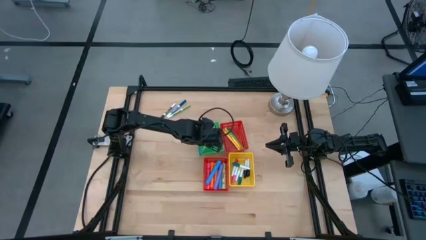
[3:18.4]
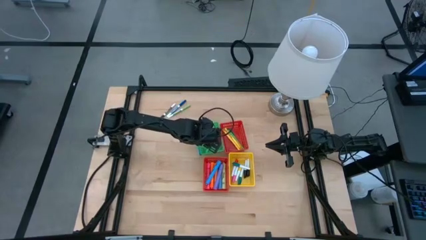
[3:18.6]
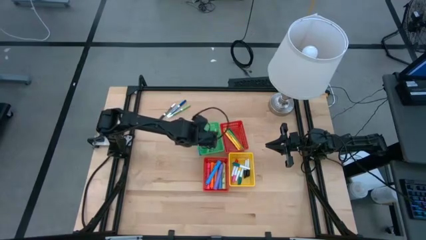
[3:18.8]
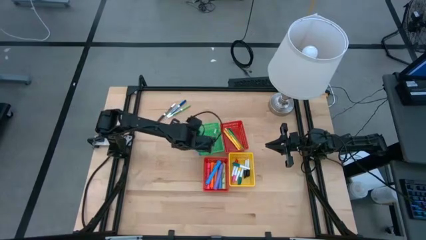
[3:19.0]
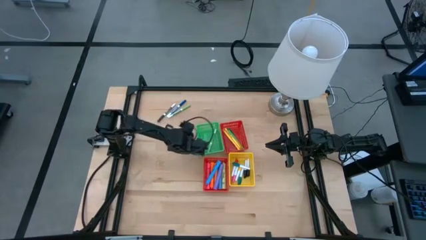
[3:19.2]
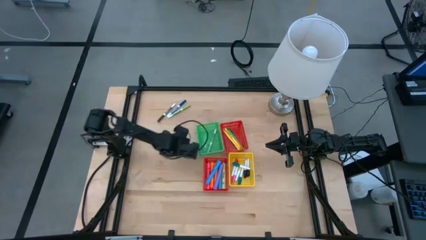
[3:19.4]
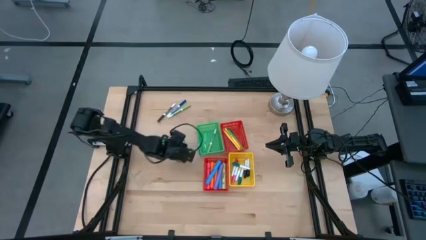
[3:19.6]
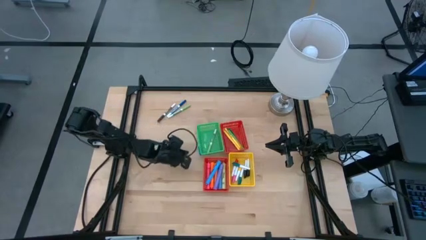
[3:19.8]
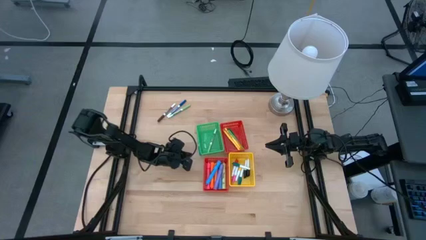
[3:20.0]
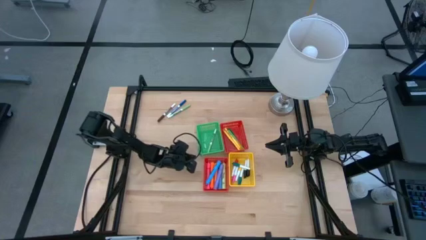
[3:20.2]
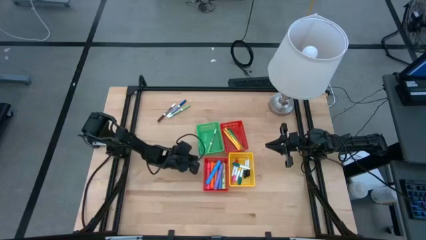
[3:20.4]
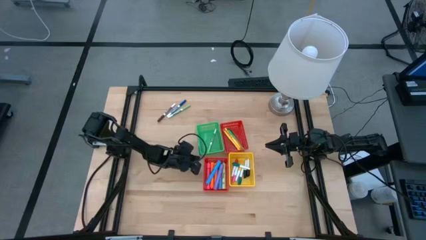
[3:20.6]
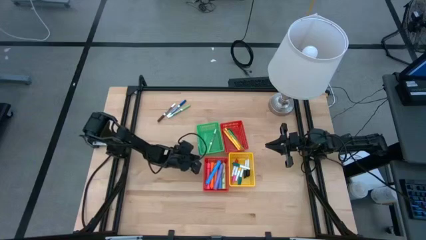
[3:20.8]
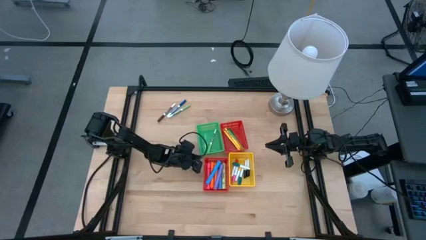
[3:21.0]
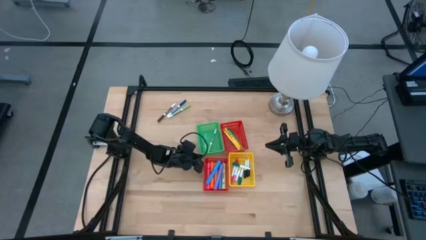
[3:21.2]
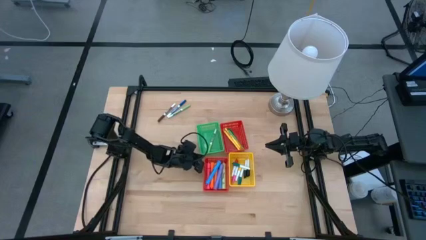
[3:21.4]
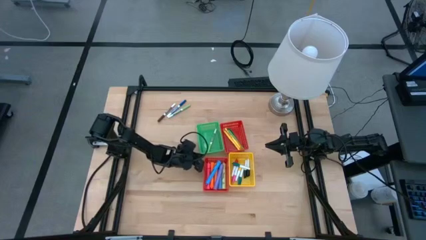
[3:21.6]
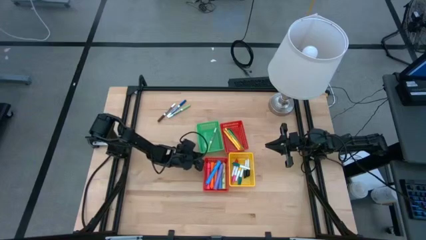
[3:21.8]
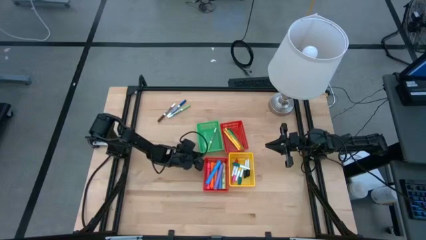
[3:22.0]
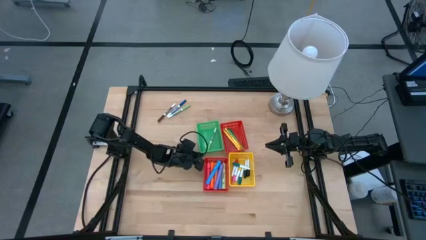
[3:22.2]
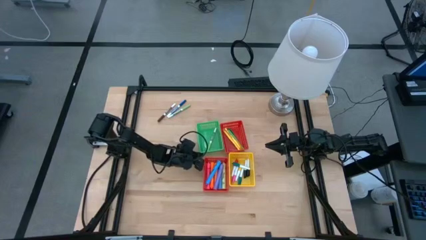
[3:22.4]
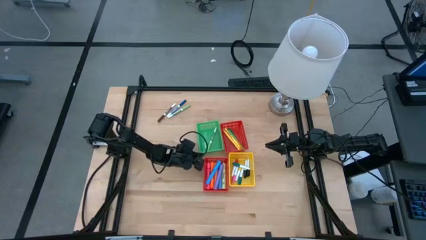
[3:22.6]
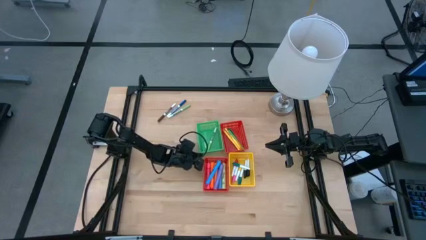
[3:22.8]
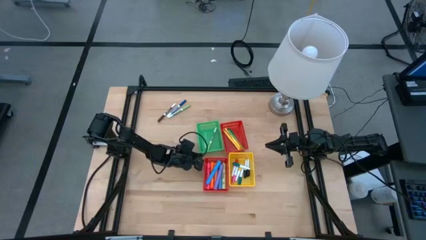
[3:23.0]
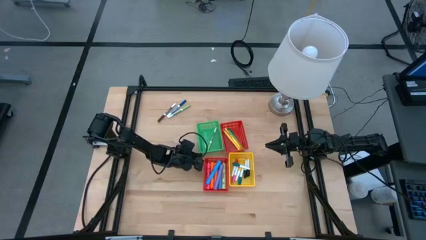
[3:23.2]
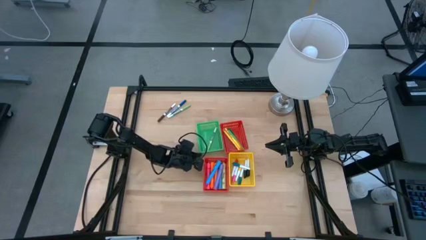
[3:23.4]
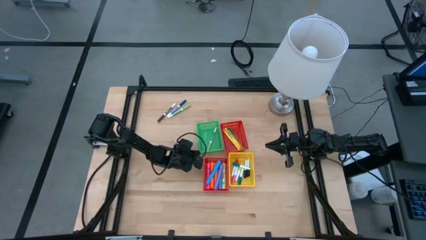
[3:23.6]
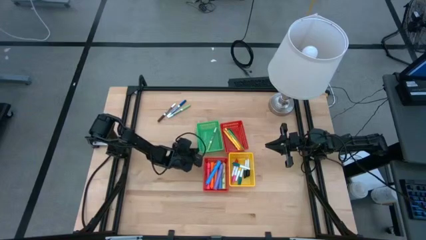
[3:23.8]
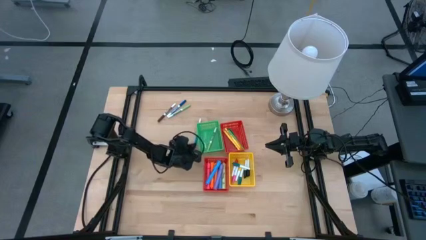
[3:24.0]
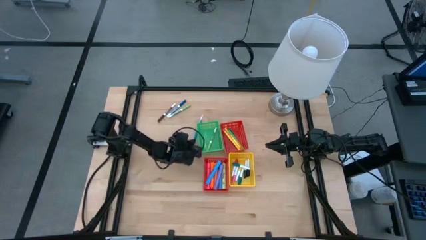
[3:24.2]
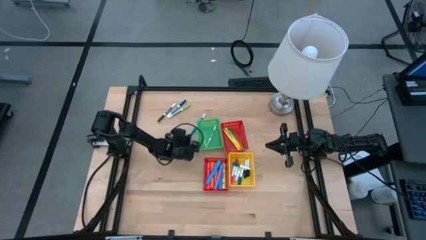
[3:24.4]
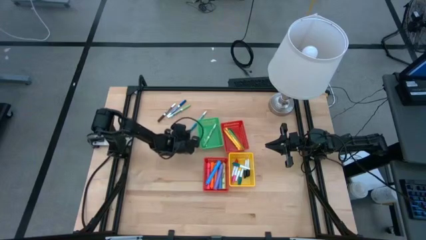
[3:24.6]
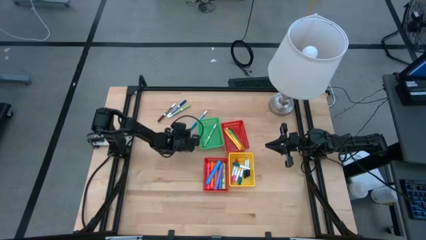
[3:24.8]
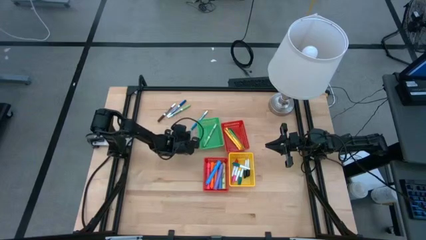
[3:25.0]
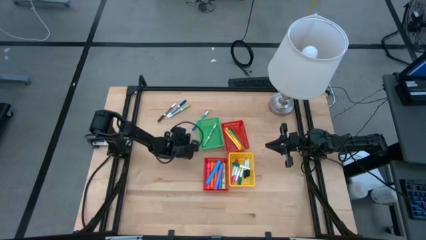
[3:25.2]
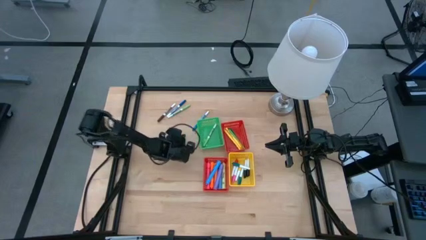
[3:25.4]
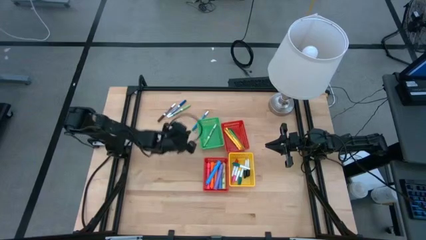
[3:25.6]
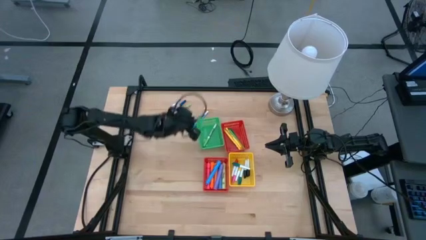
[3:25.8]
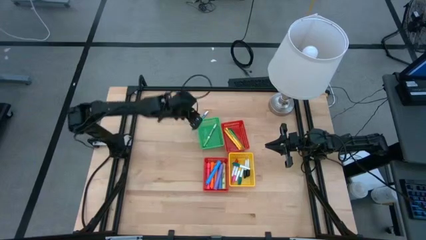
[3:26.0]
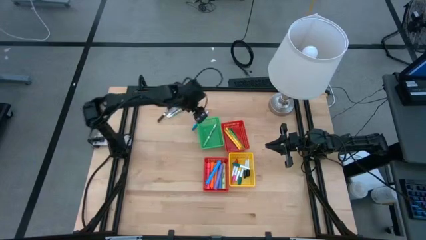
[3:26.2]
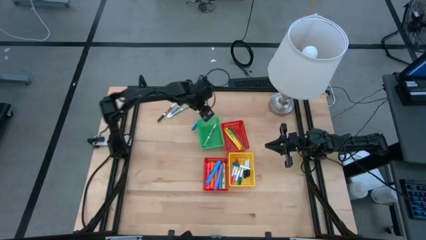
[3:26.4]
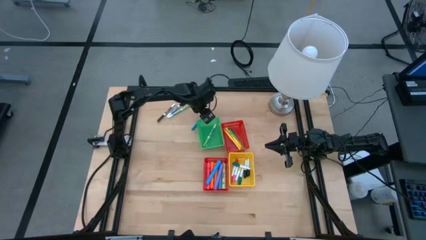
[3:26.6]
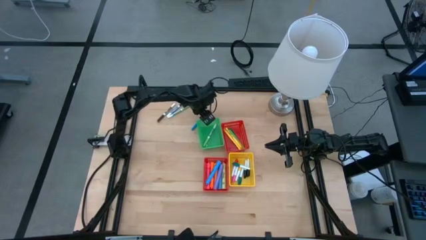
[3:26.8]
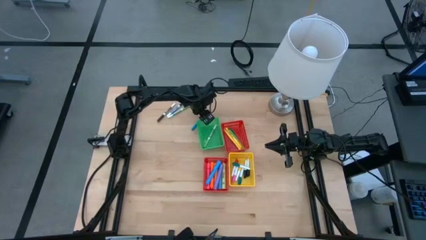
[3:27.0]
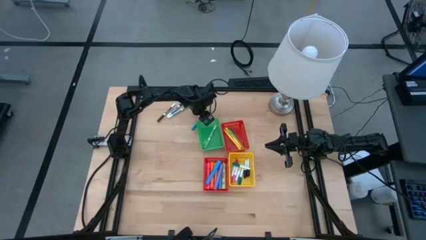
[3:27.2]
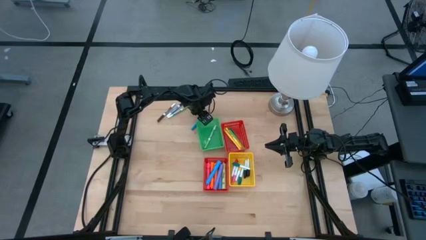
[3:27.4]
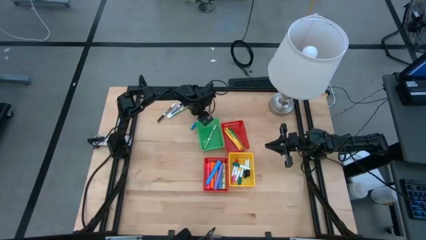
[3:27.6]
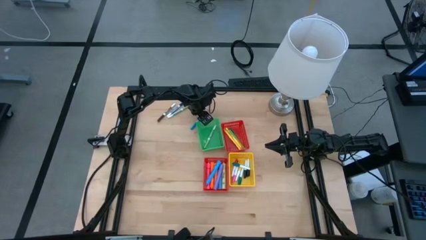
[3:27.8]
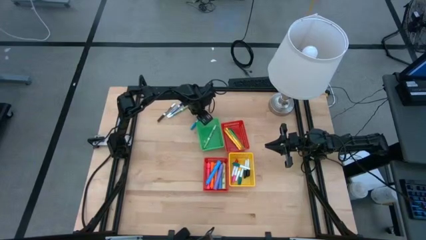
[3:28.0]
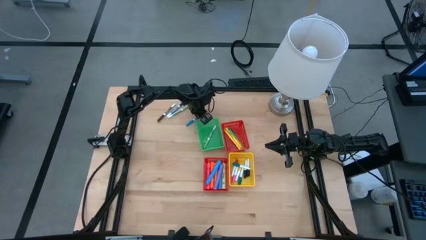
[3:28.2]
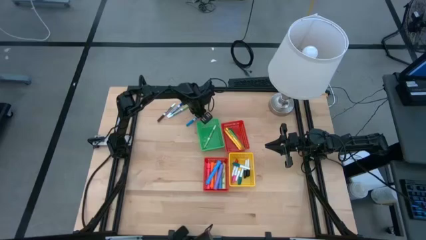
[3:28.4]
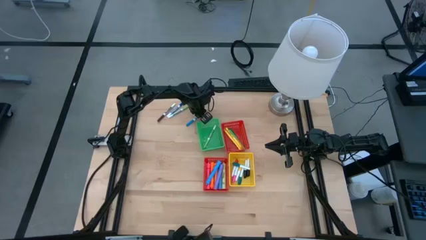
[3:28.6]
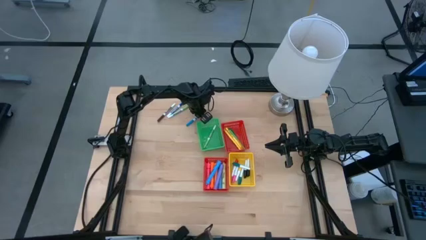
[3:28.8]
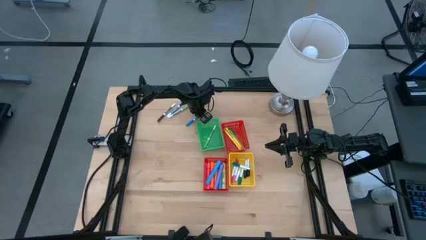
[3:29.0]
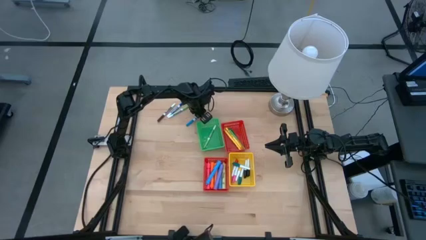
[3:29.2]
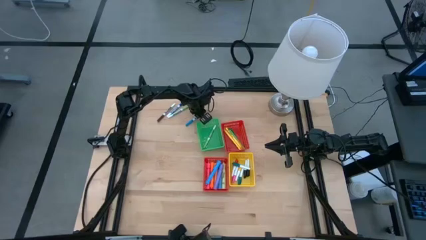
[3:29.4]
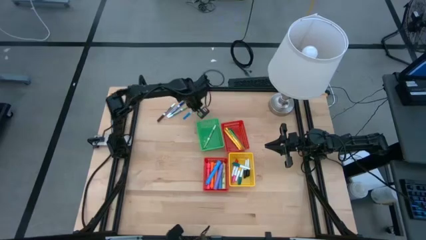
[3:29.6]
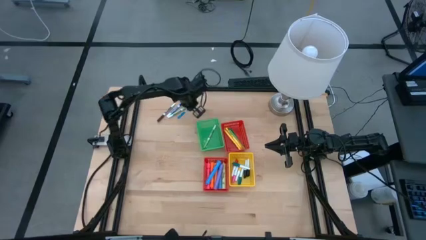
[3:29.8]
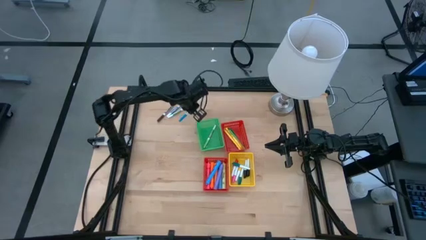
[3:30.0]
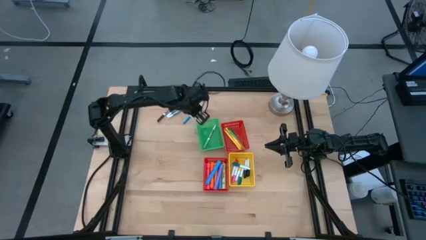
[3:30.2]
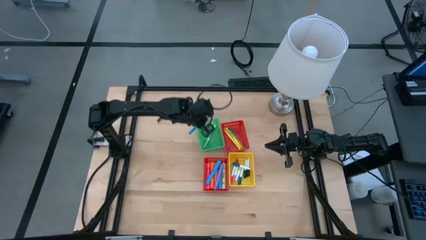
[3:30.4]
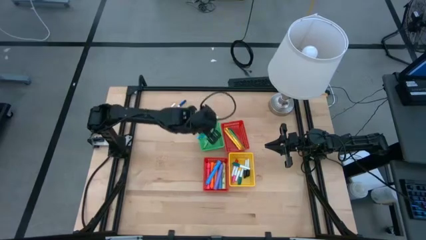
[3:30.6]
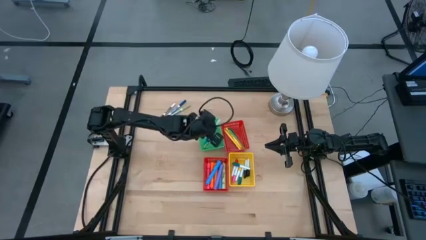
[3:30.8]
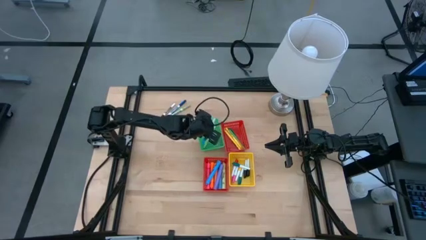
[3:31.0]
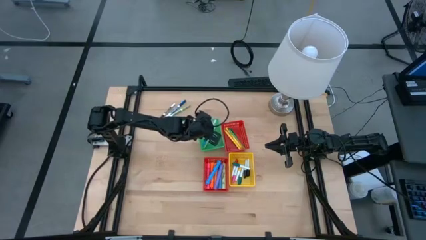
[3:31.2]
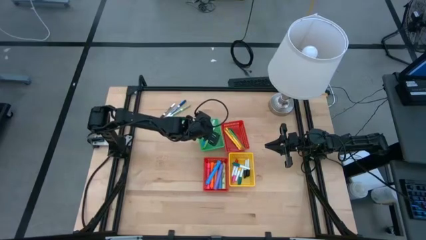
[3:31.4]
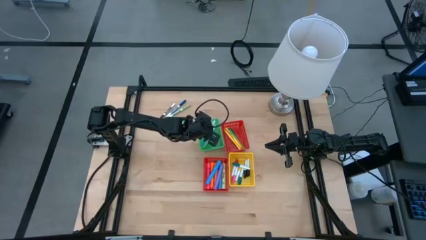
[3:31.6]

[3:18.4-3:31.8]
Task: Pick & Place Markers
Put the blue marker pen into the green bin
